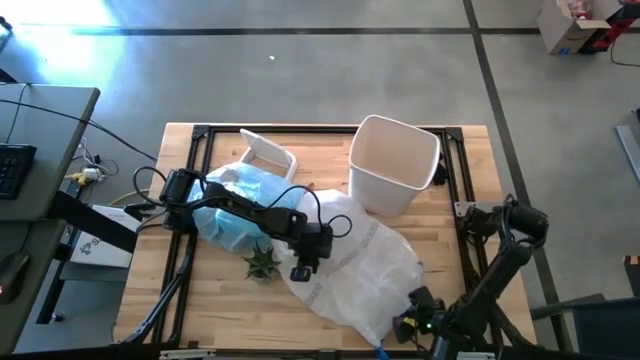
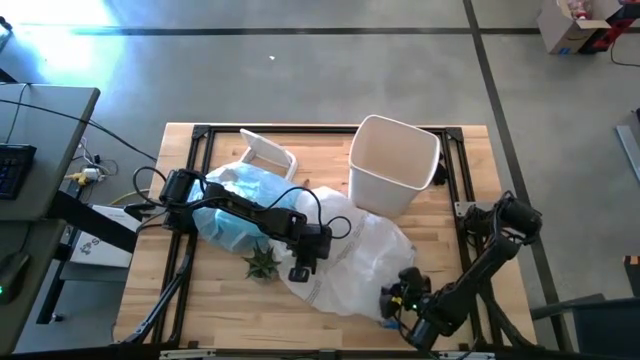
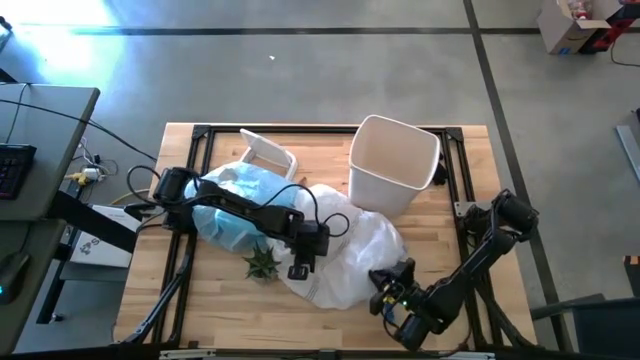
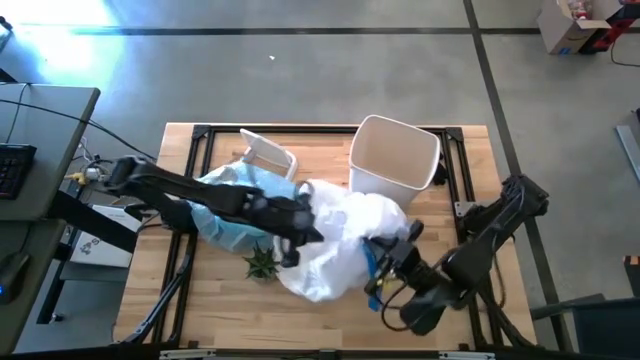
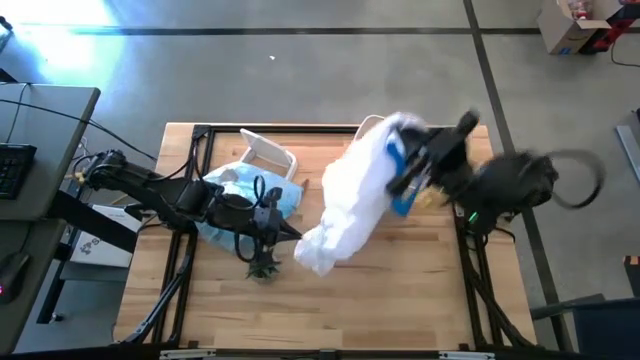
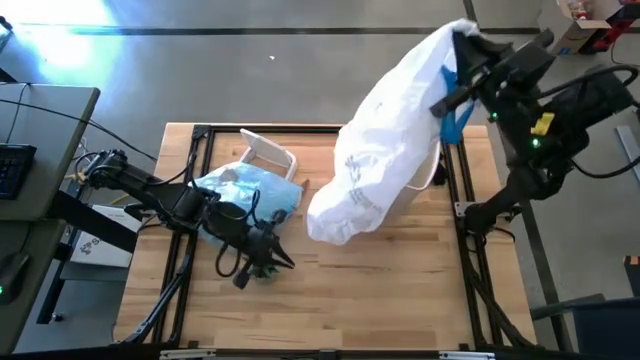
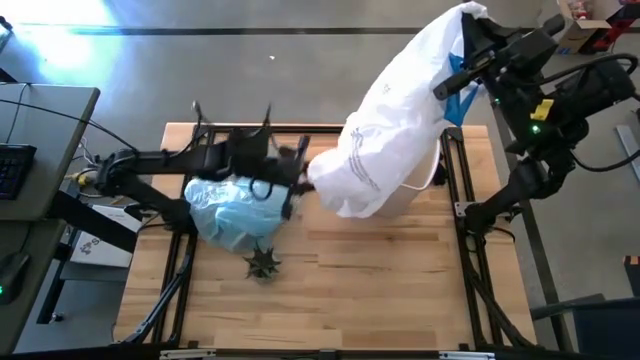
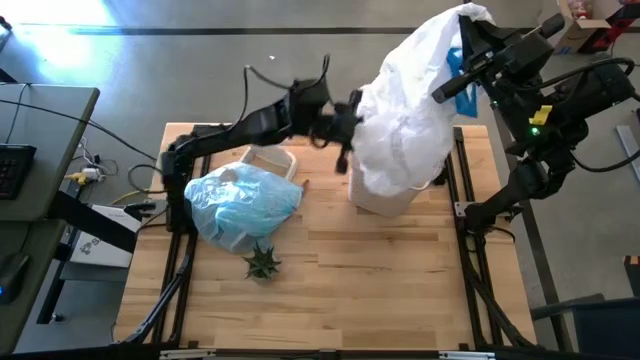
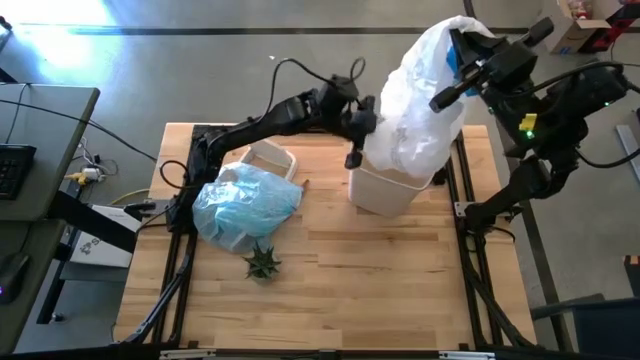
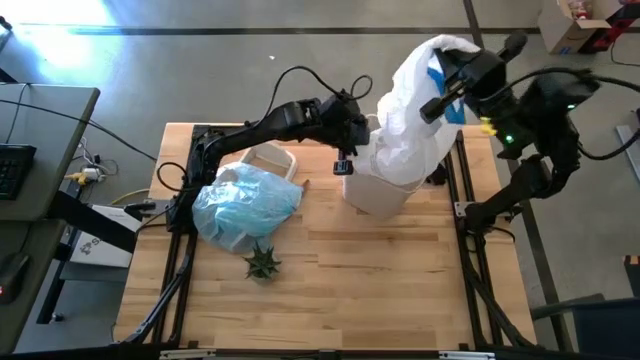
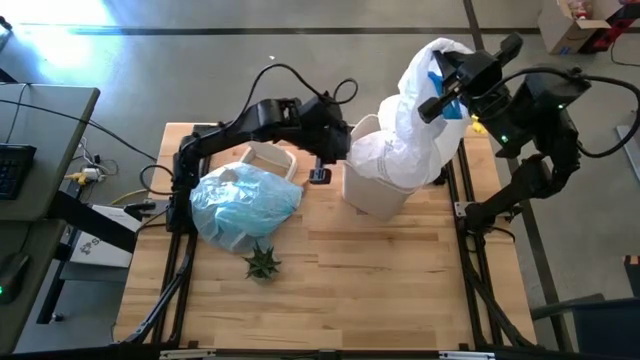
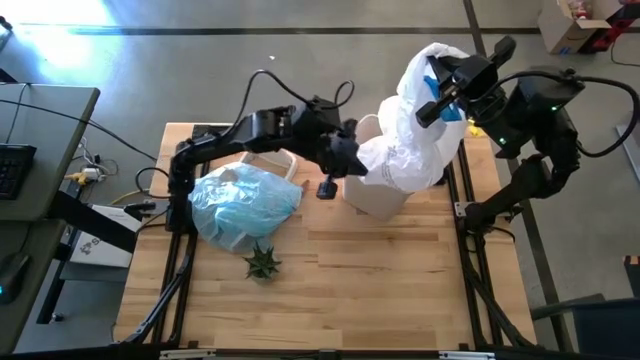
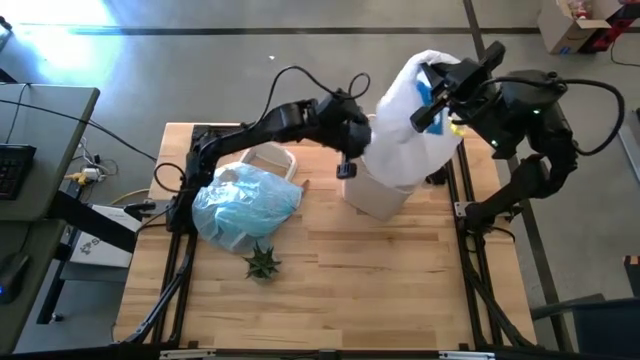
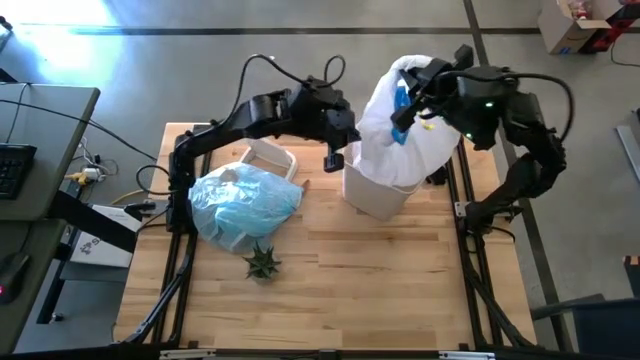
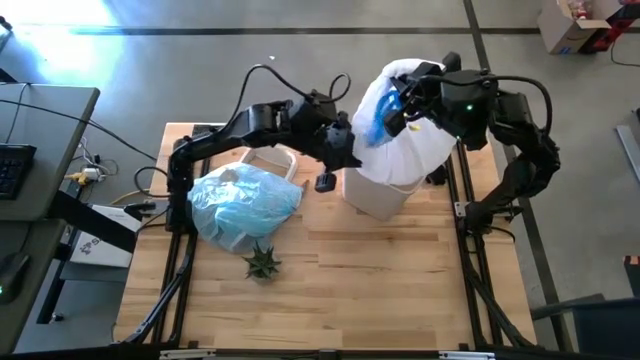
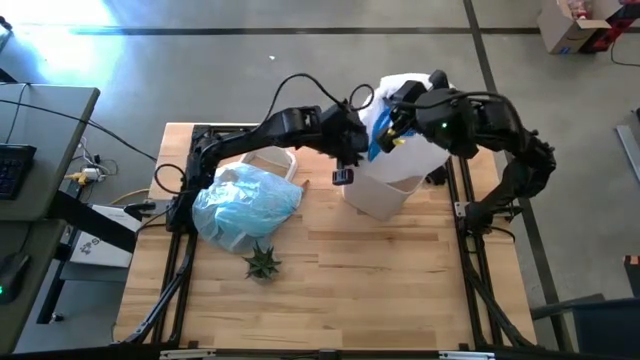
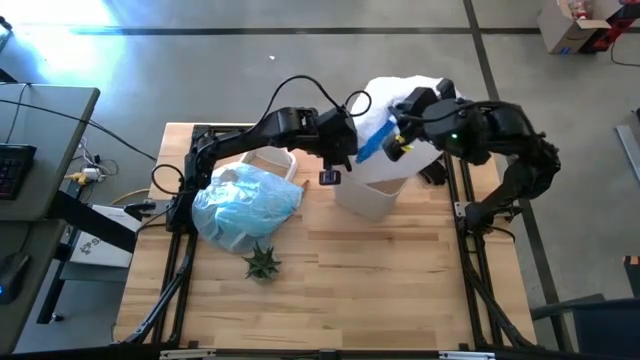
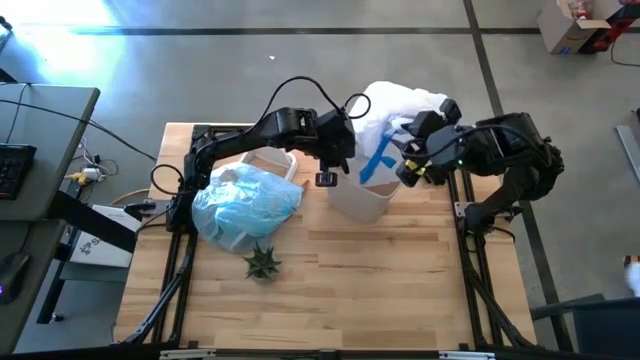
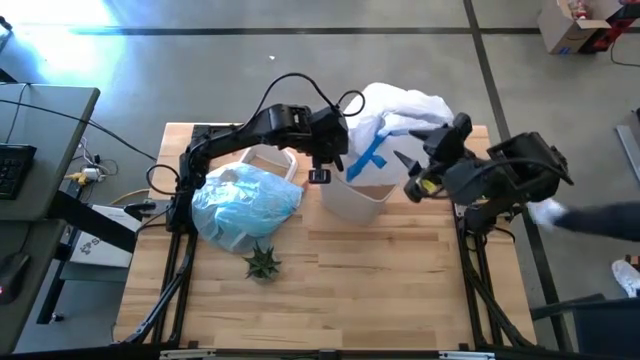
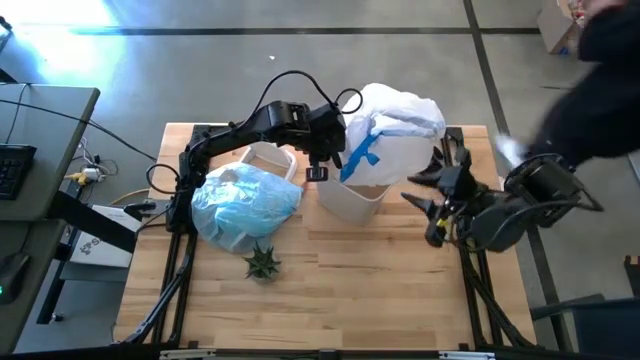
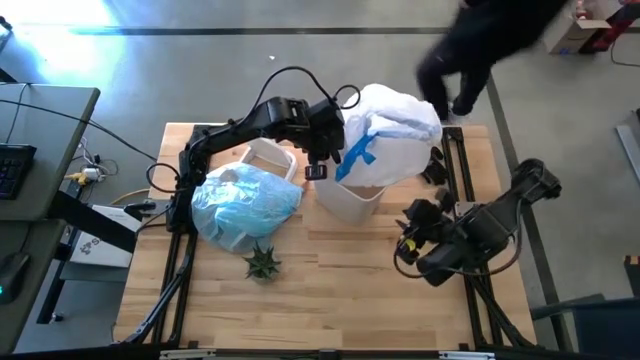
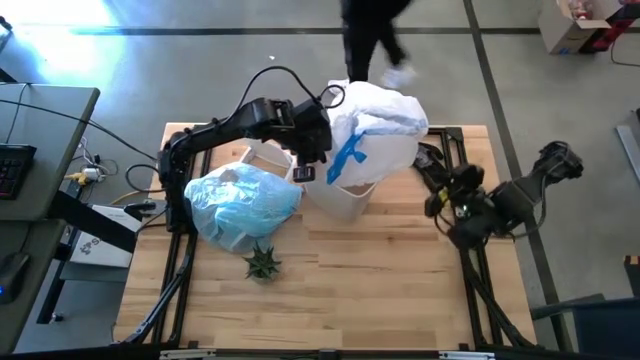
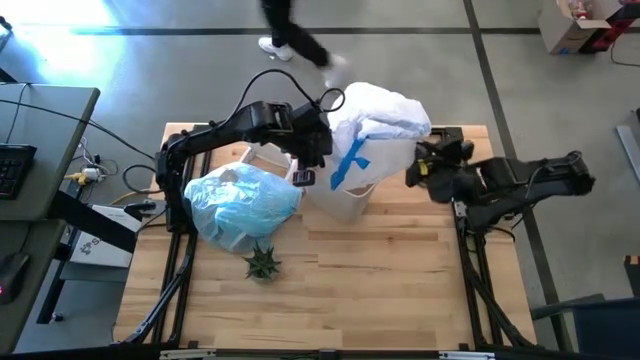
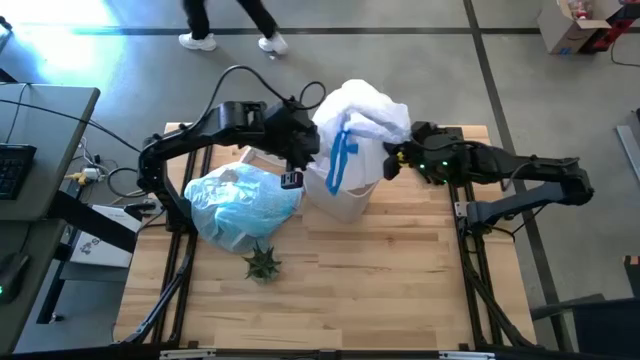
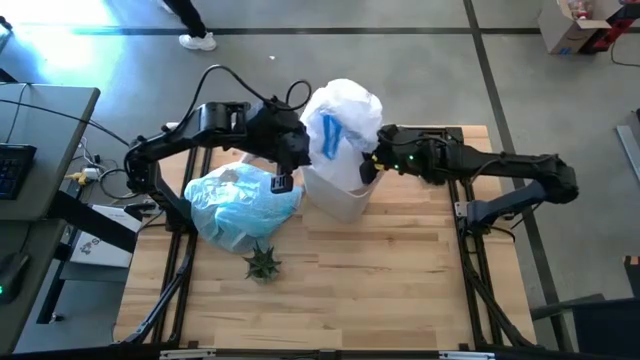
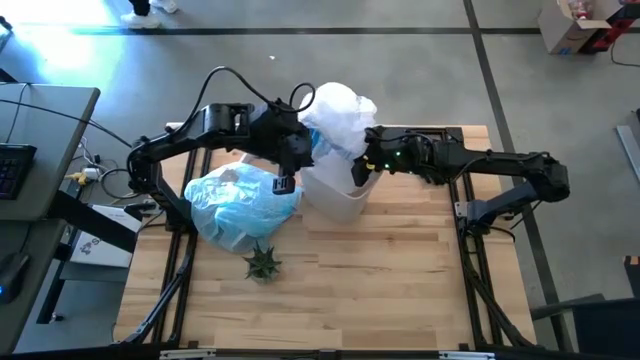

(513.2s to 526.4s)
Task: place trash/remove bag and relplace
Insert the new trash bag into the trash bin

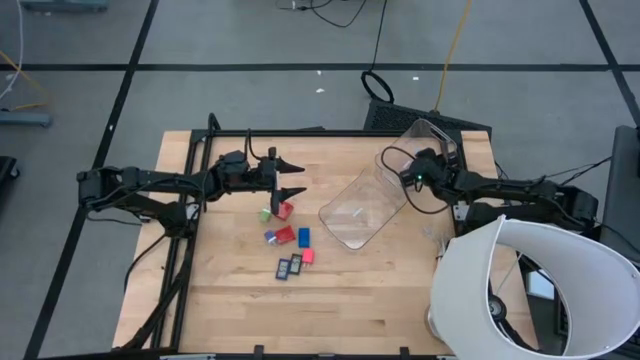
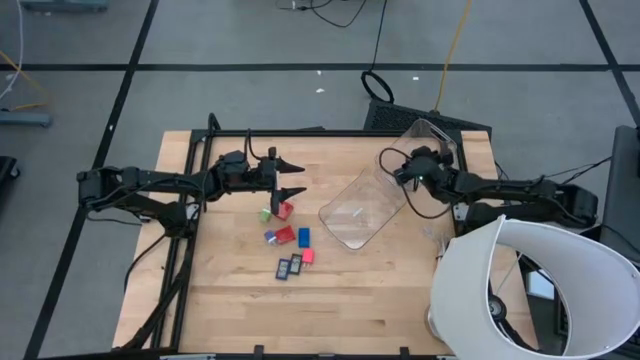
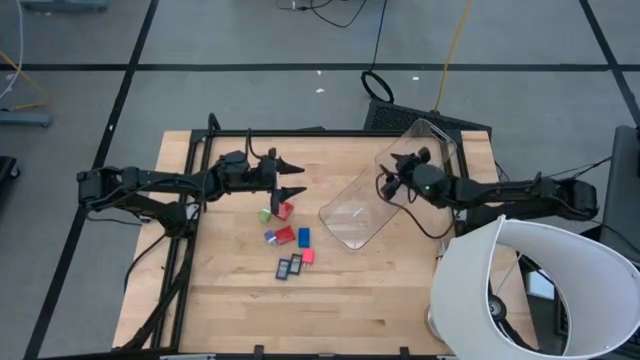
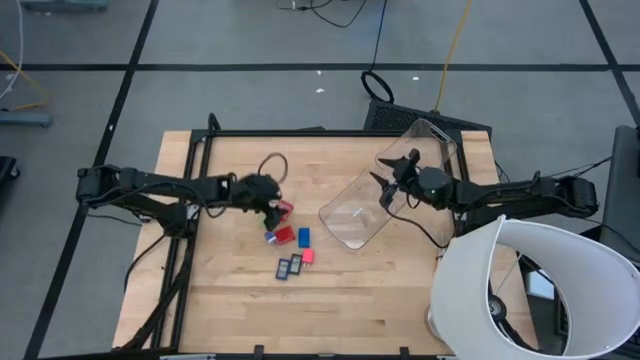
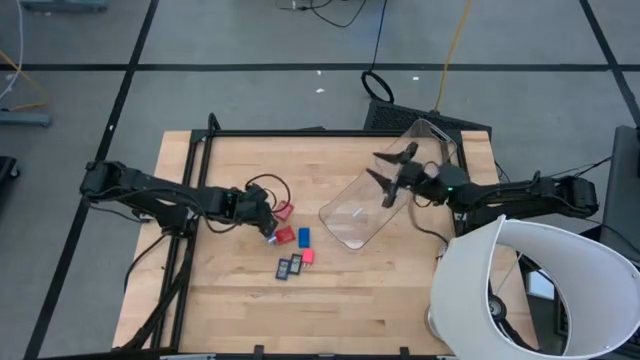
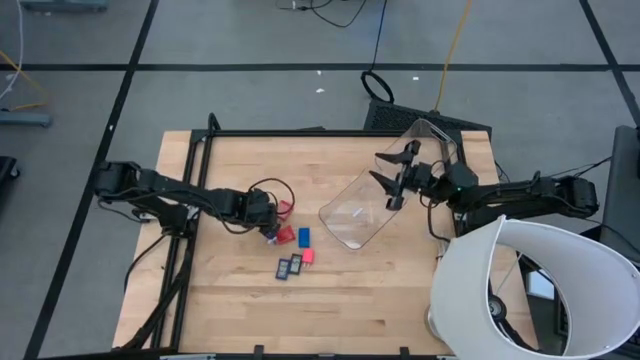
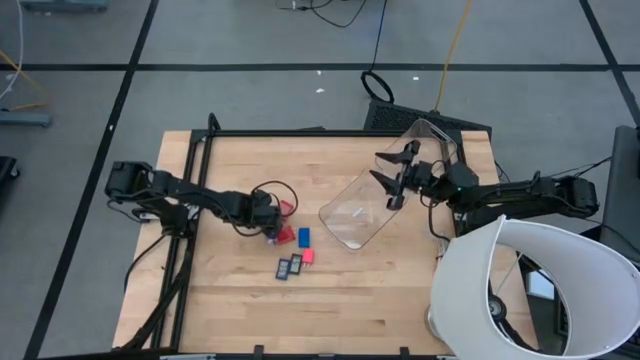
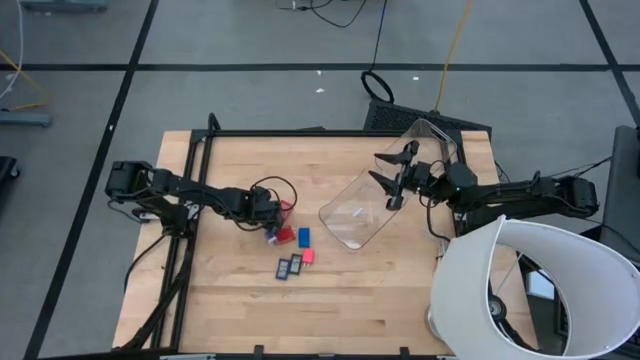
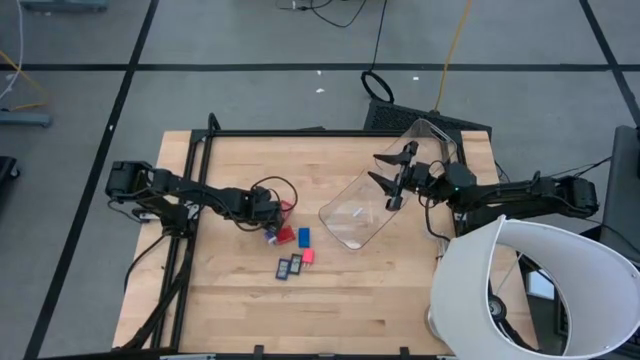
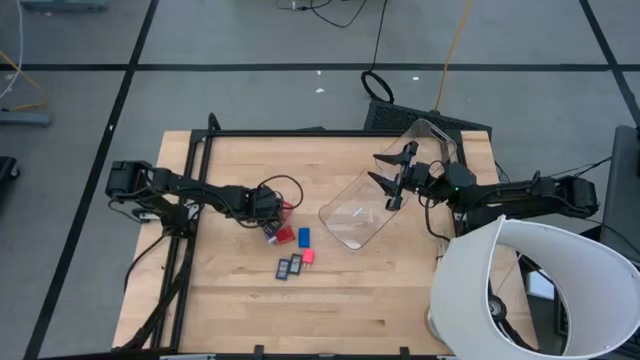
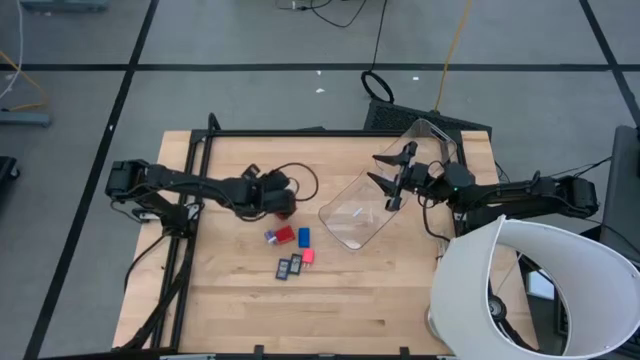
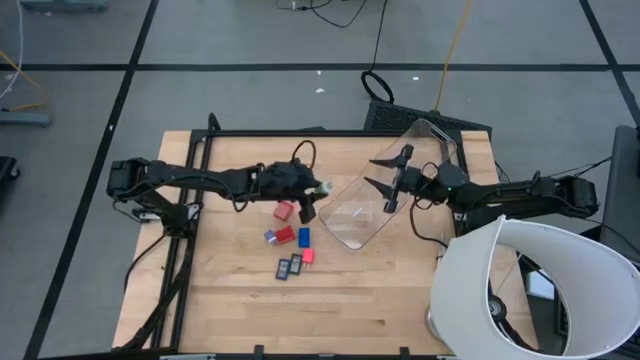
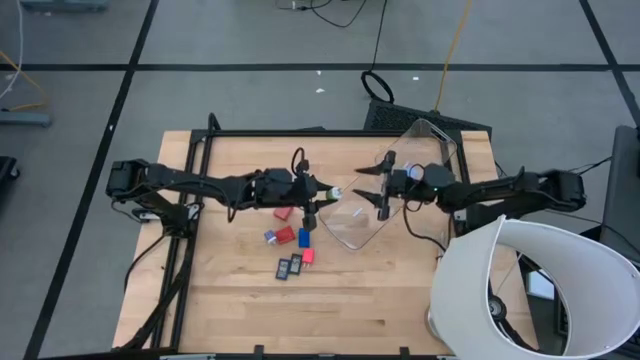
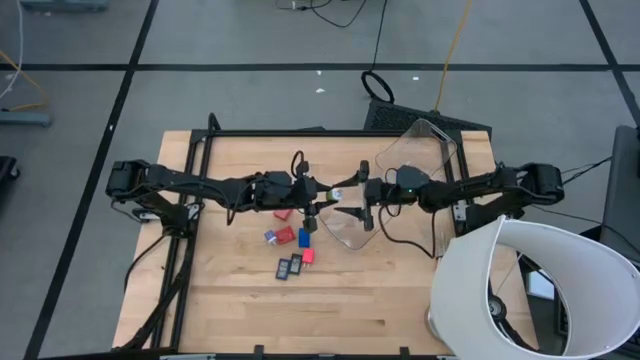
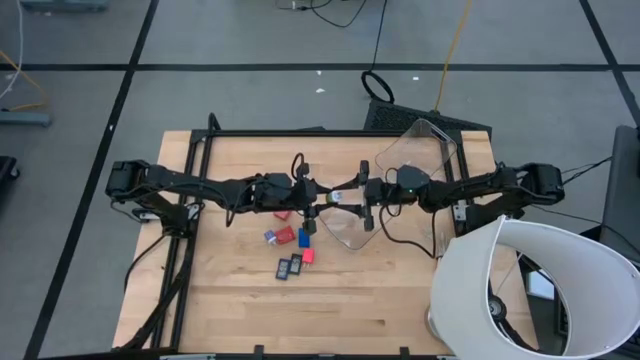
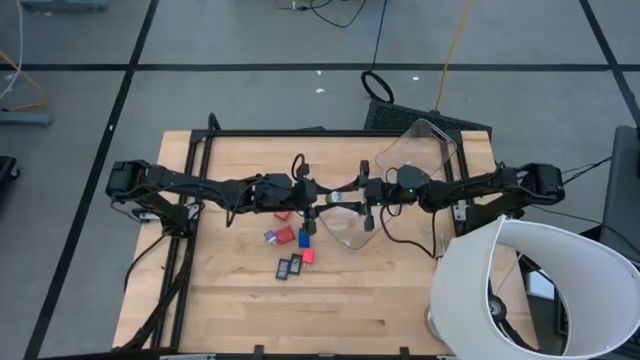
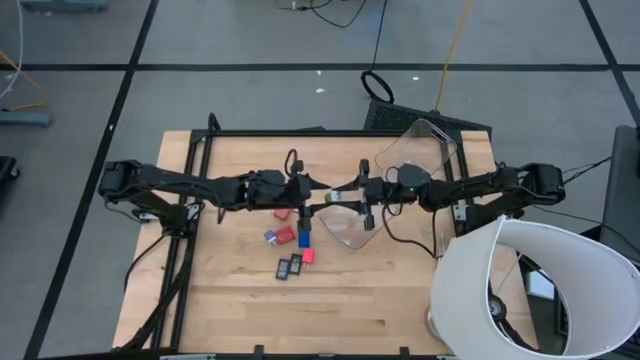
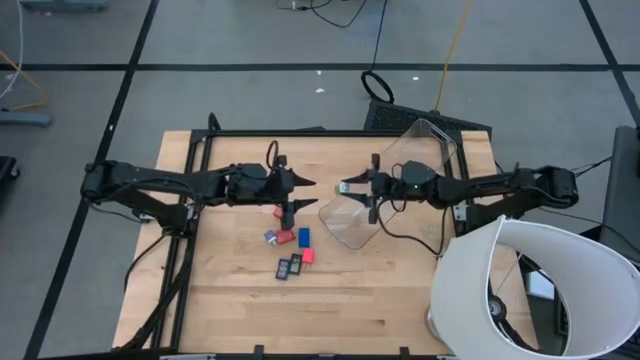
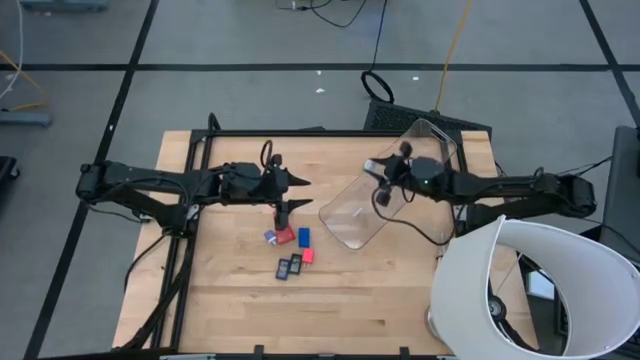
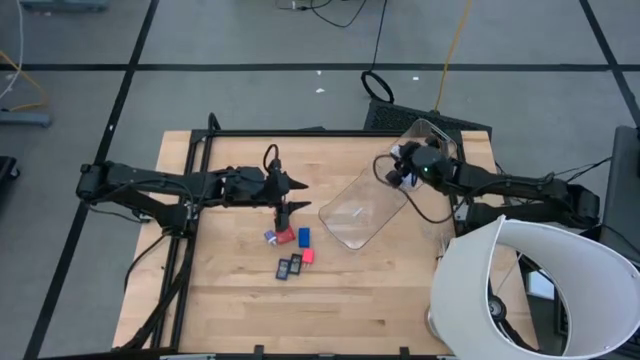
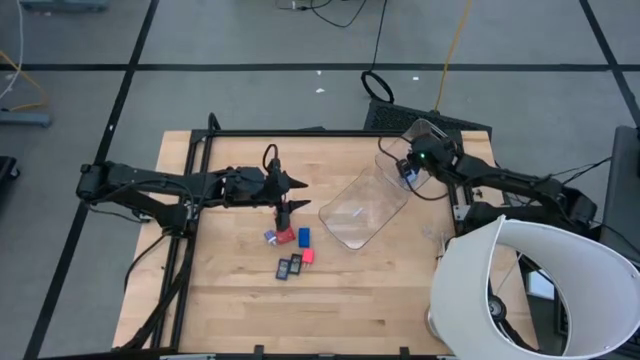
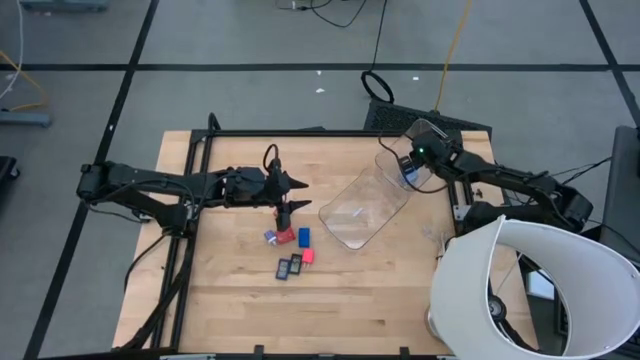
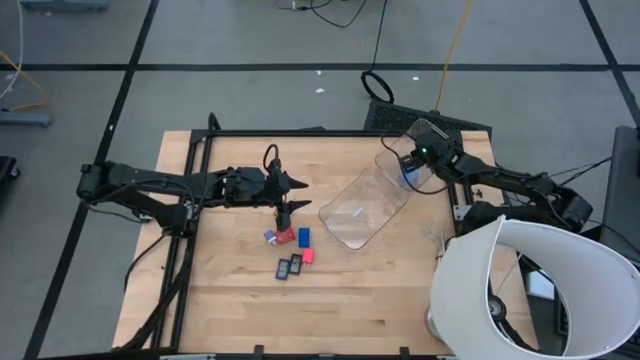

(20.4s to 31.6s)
Task: Pick & Place Office items
Put the green charger adapter into the right transparent bin
